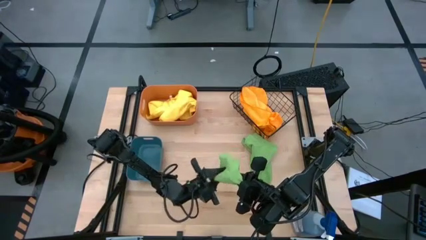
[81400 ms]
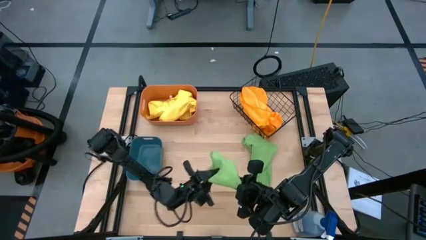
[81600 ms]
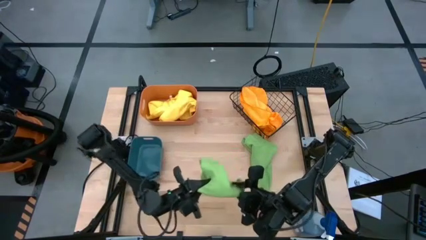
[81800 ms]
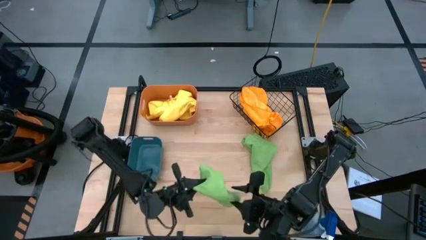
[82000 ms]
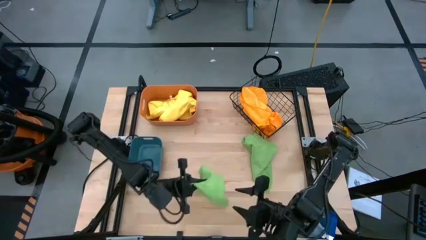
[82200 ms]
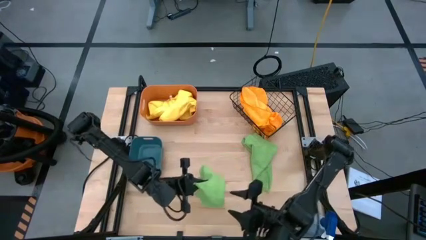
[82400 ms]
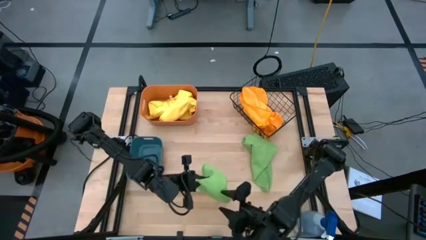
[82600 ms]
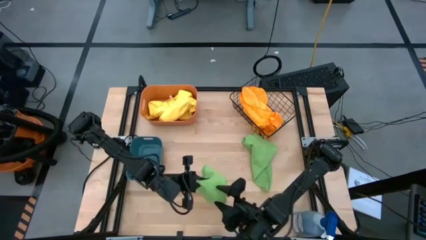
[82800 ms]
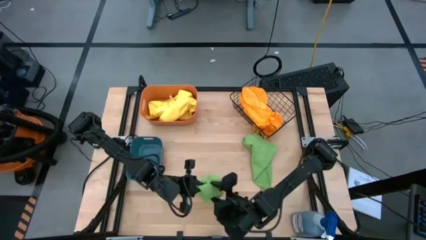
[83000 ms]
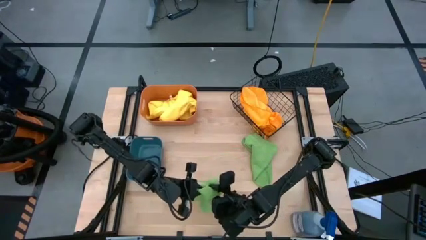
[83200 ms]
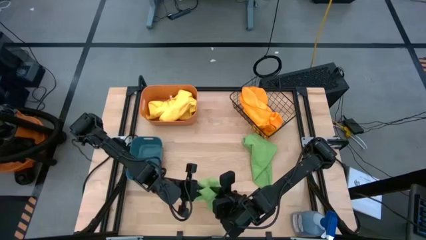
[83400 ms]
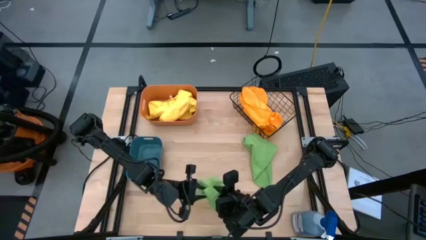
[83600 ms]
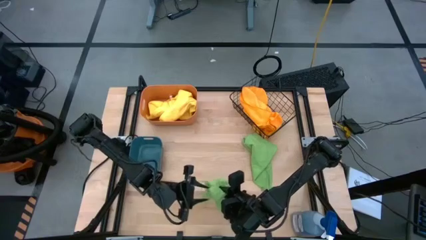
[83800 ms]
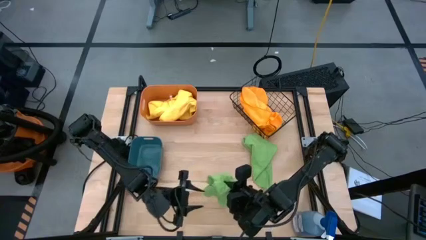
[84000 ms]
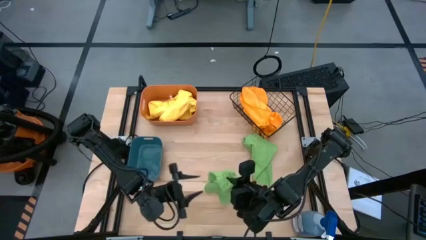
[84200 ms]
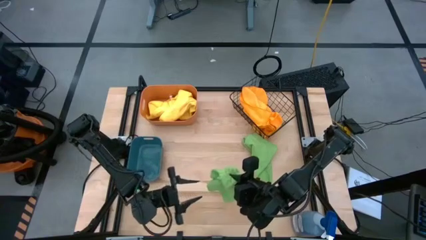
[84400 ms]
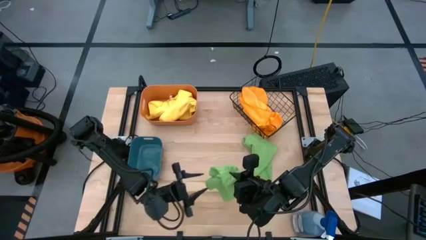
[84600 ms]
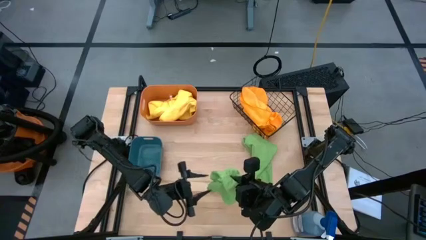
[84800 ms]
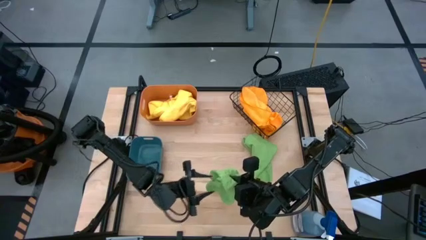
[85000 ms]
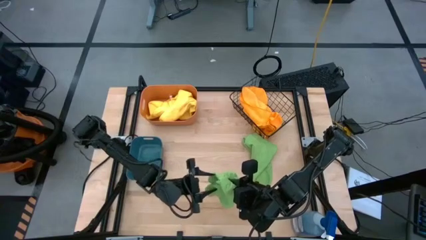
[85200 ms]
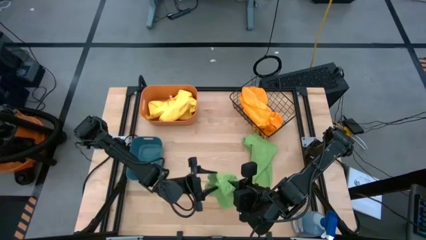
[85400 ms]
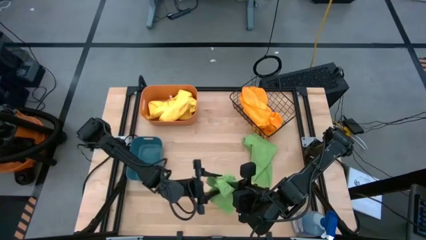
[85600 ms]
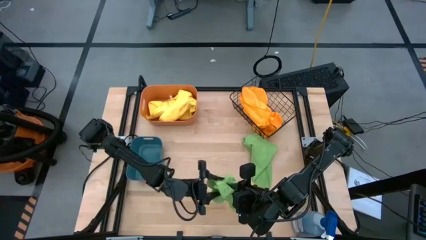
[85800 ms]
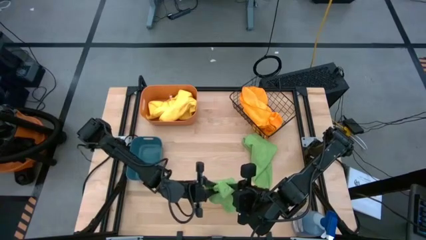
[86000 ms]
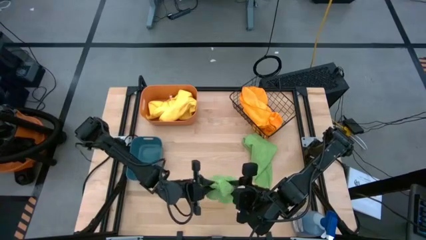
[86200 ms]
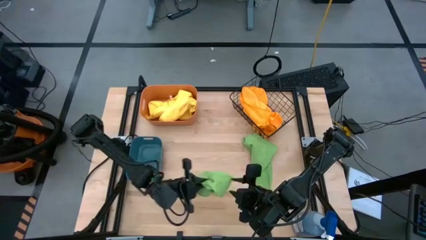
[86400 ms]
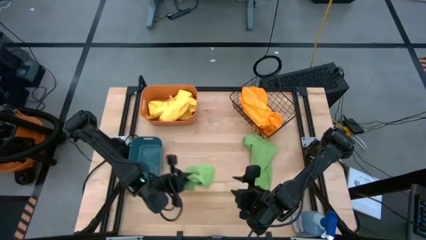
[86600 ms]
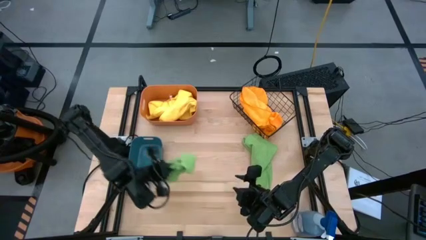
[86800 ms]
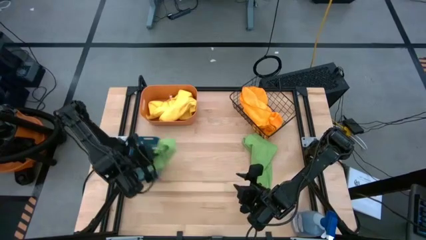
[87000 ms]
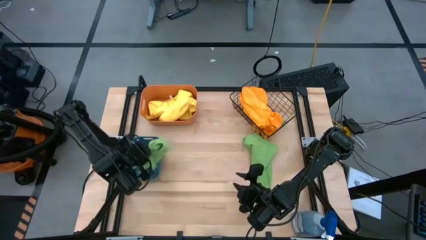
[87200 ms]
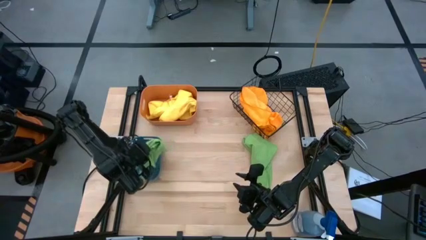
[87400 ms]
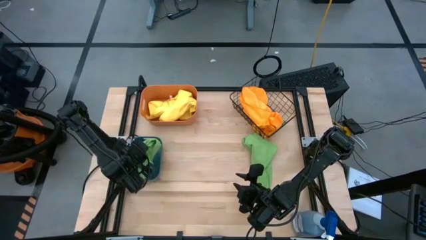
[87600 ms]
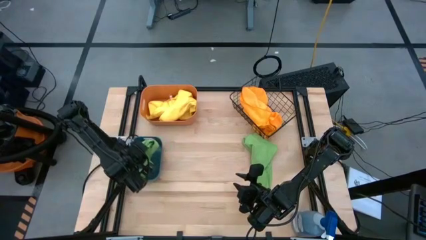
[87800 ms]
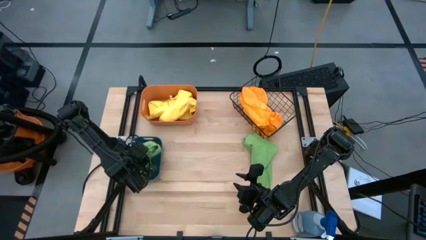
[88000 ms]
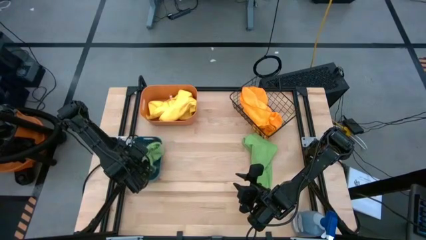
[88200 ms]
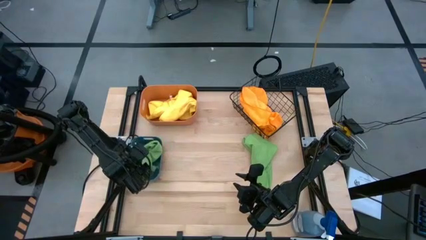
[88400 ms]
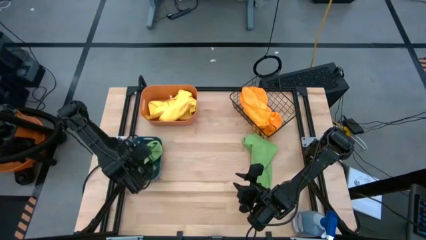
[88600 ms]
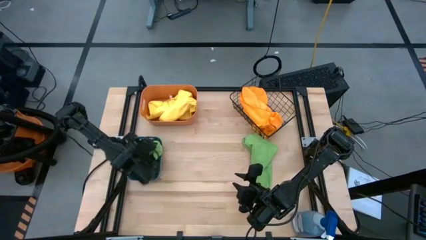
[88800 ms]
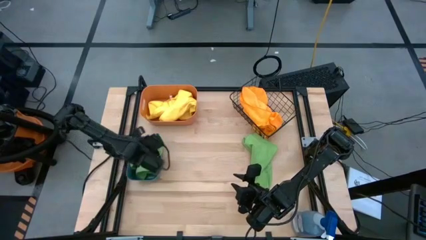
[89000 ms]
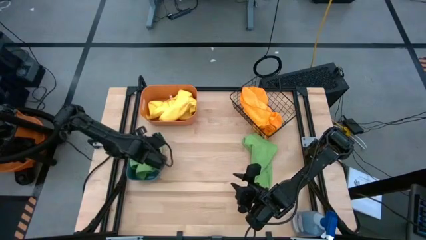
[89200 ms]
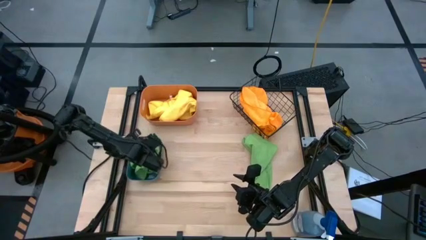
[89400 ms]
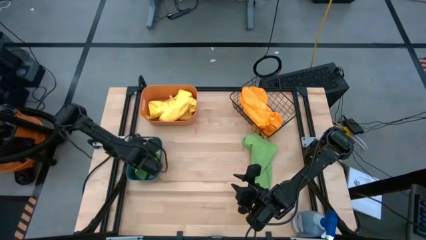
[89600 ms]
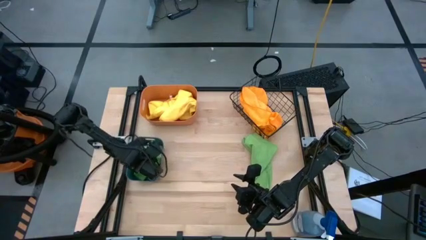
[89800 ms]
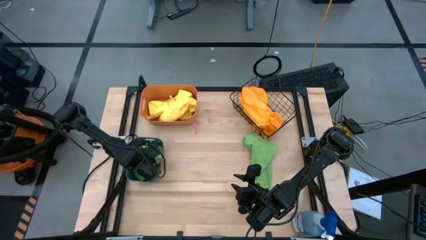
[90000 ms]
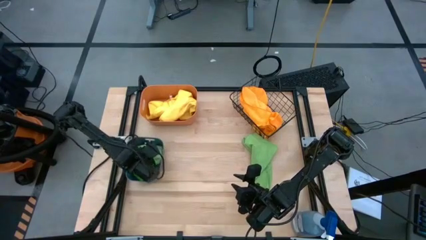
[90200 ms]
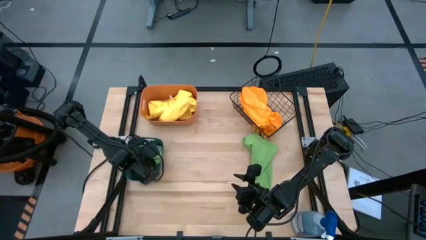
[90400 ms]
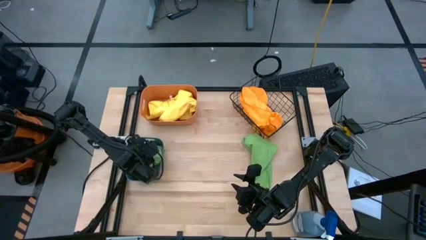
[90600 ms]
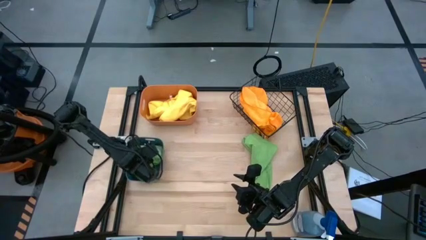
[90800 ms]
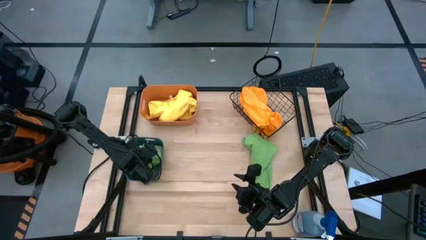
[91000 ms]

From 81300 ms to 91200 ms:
Task: Sort microfiber towel by color & place in baskets
Put the left green microfiber towel into the blue bin

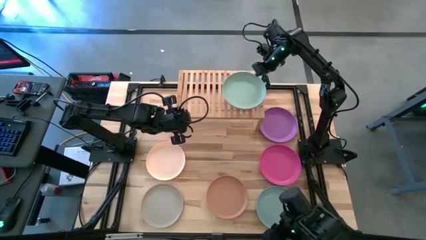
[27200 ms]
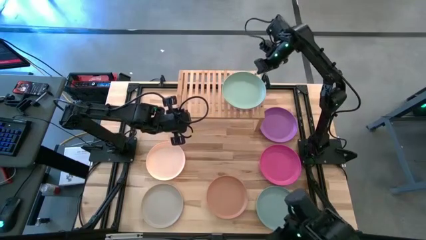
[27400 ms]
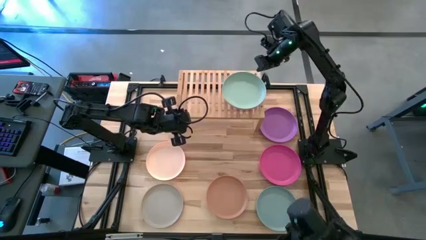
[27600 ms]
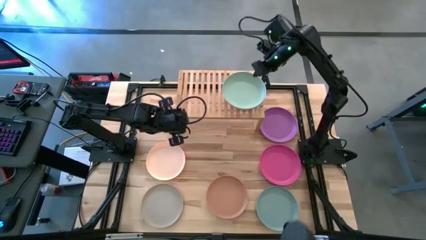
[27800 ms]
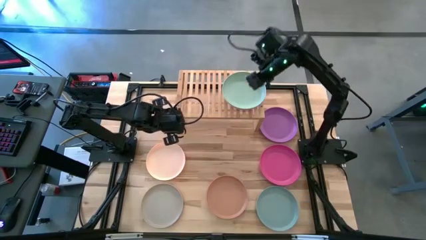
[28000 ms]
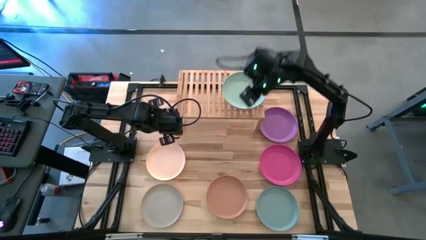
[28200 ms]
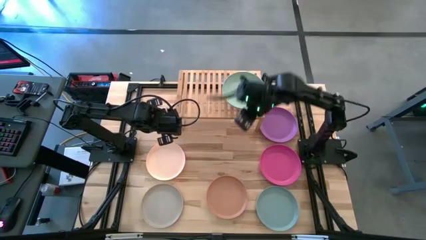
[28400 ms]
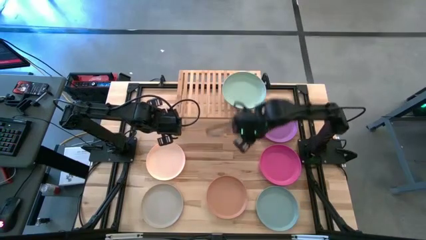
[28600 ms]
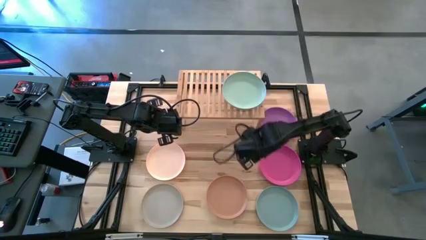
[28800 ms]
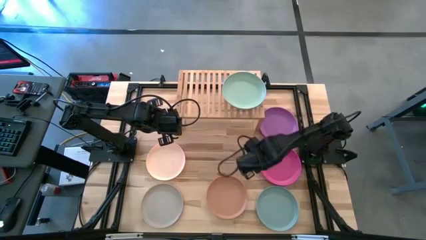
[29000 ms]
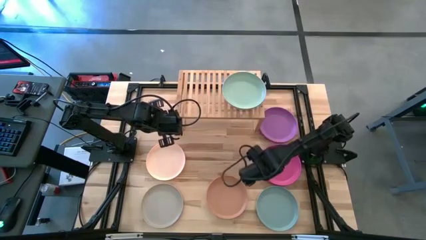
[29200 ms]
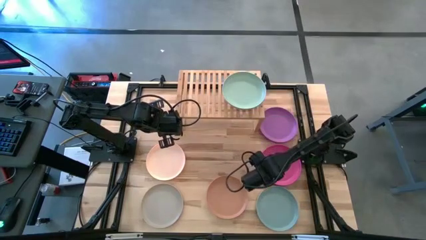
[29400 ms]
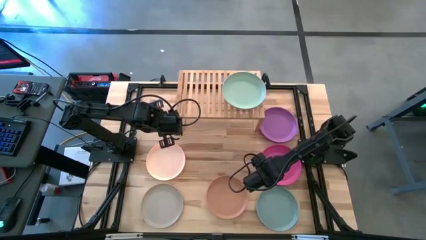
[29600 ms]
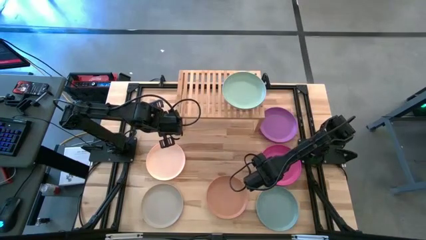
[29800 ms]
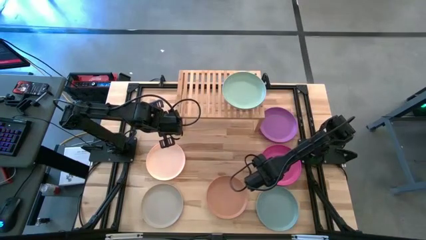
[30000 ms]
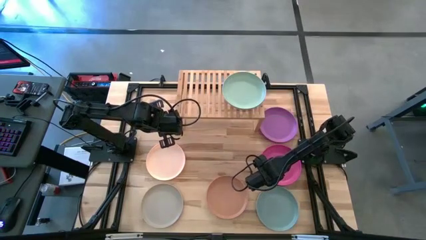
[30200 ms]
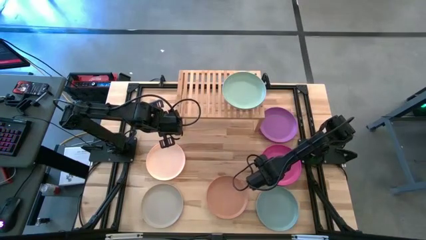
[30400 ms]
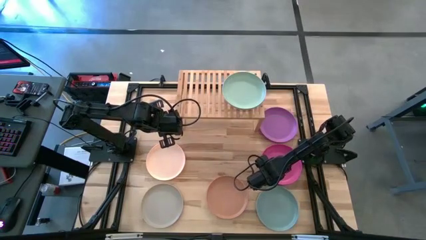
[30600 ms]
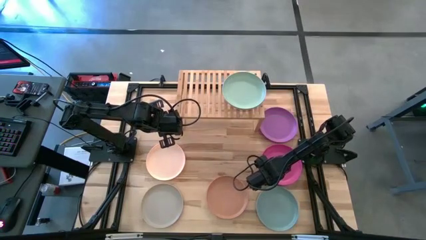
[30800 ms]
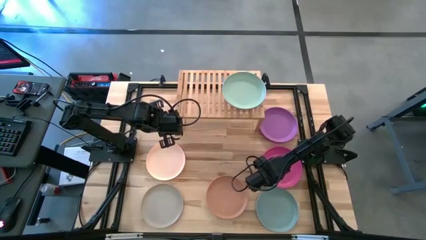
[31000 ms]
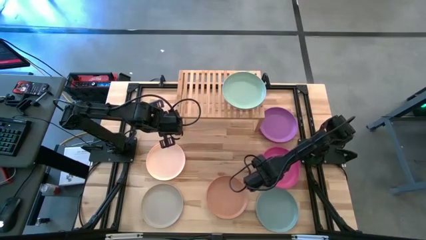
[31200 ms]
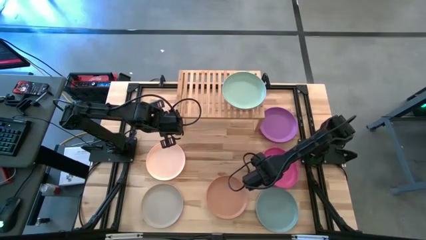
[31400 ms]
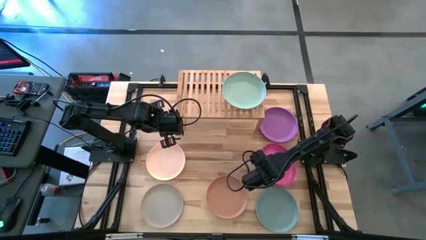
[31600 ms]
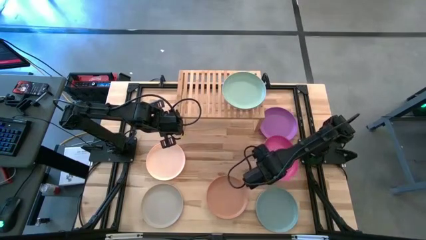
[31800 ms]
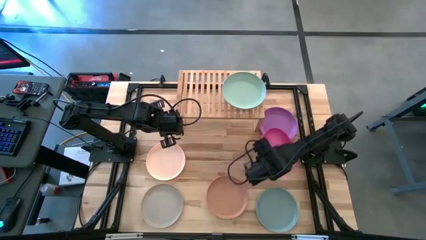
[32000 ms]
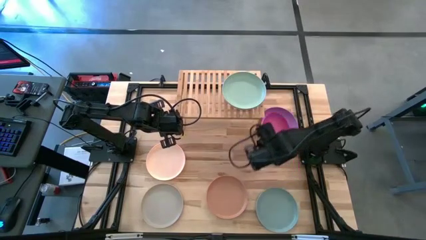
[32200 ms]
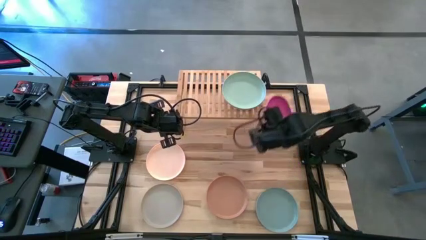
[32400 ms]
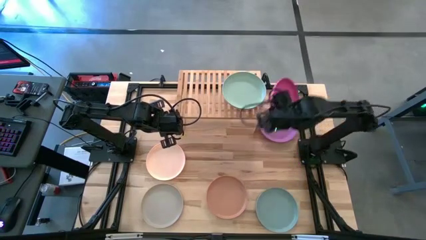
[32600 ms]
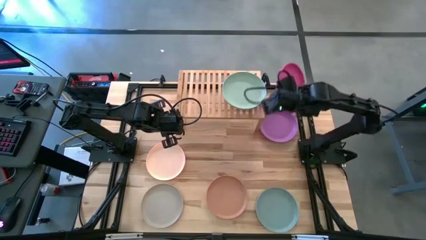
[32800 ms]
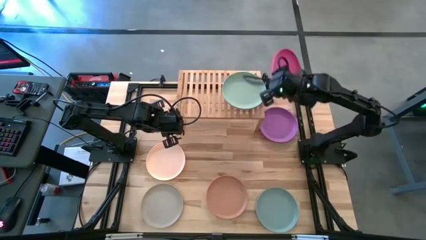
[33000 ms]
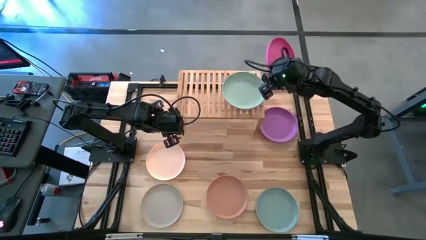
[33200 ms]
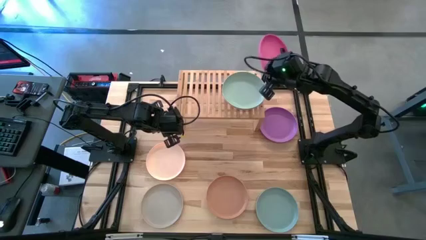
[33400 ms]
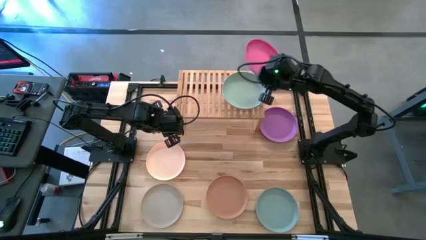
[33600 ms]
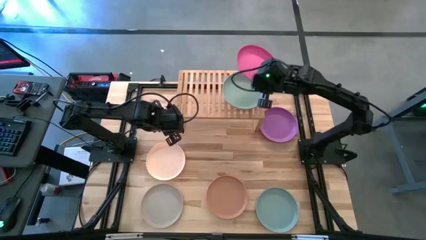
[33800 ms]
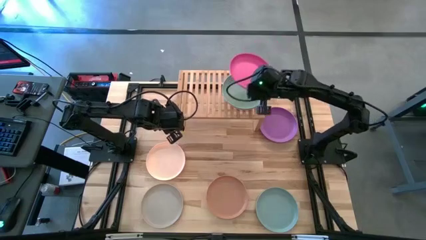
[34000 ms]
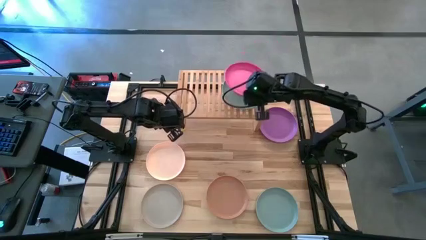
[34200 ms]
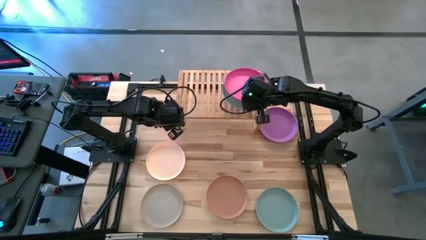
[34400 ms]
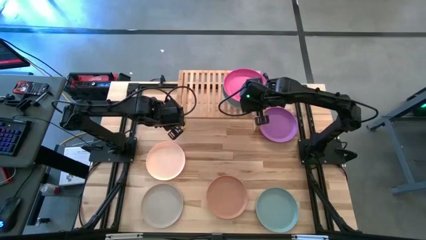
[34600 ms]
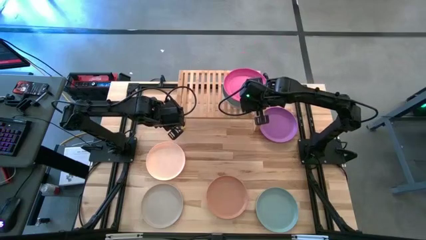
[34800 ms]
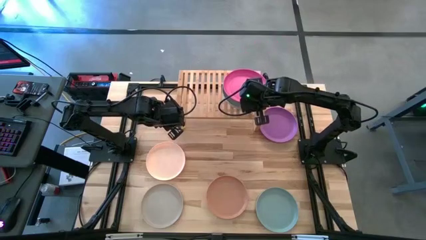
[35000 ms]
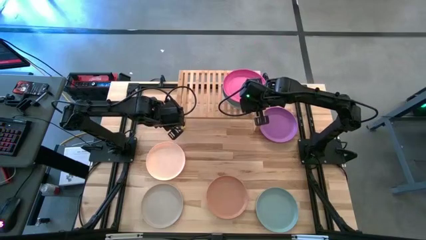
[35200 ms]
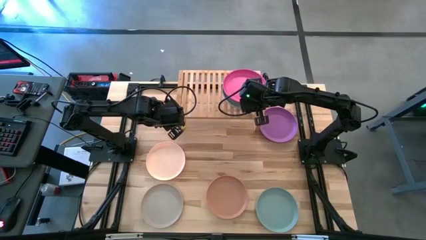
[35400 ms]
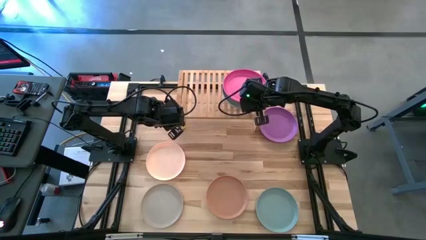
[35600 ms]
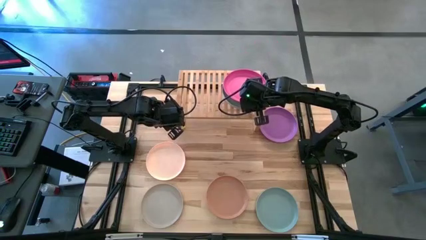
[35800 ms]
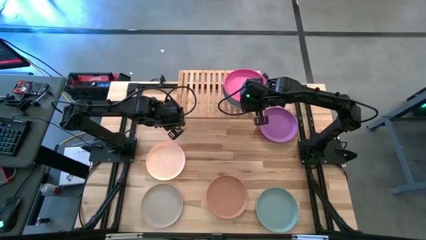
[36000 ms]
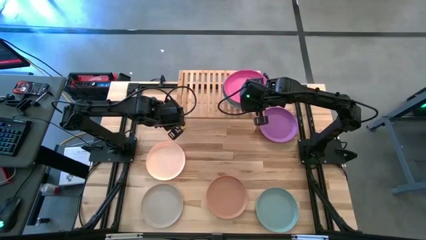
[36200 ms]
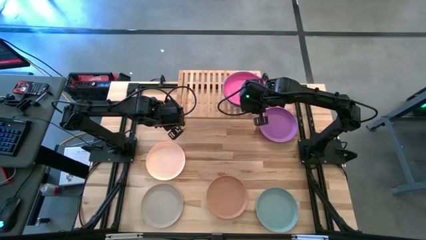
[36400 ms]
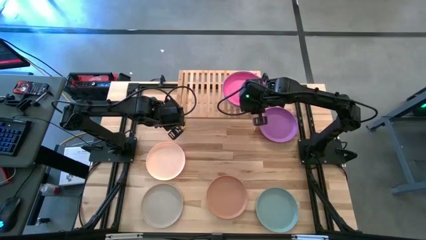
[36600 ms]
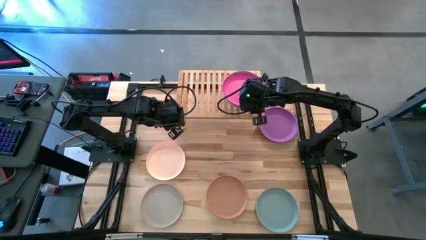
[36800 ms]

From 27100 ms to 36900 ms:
Task: Place and stack plates onto a shelf
Stack the pink plate on the light green plate on the shelf
